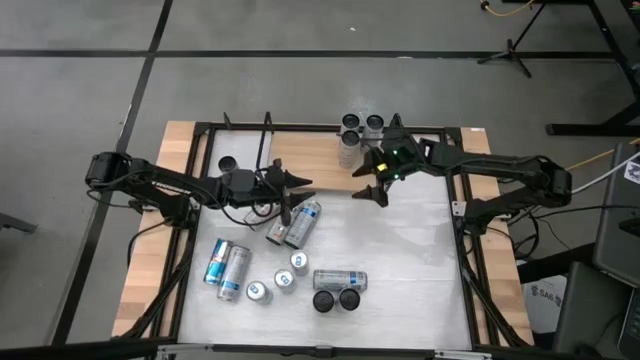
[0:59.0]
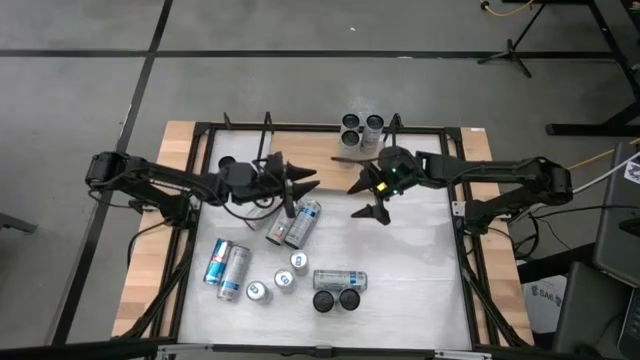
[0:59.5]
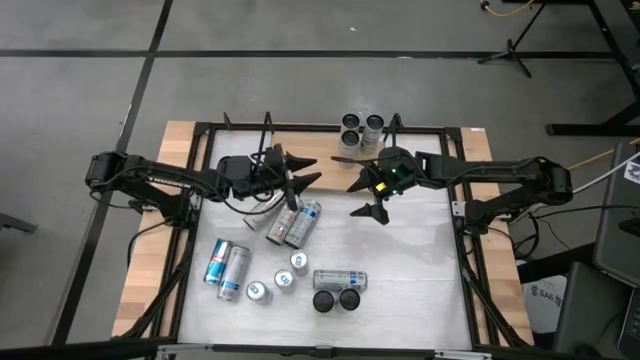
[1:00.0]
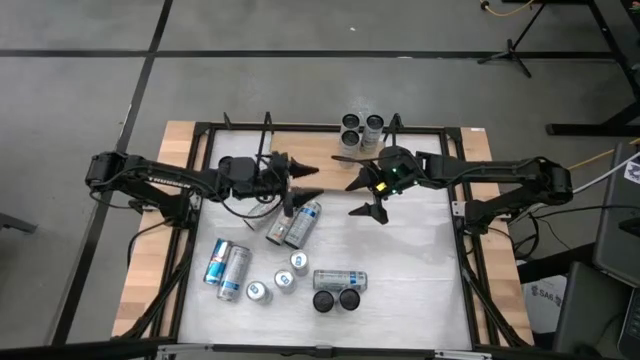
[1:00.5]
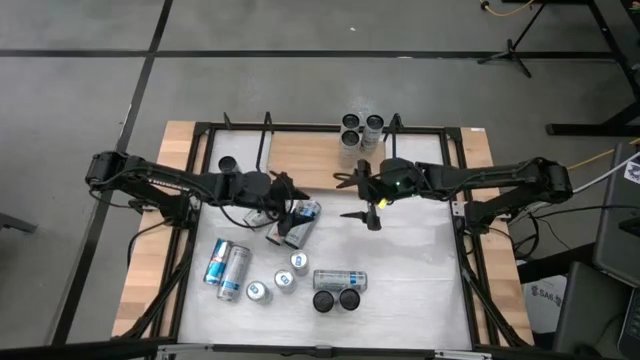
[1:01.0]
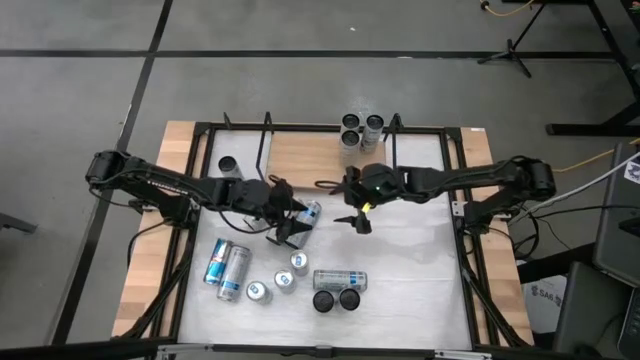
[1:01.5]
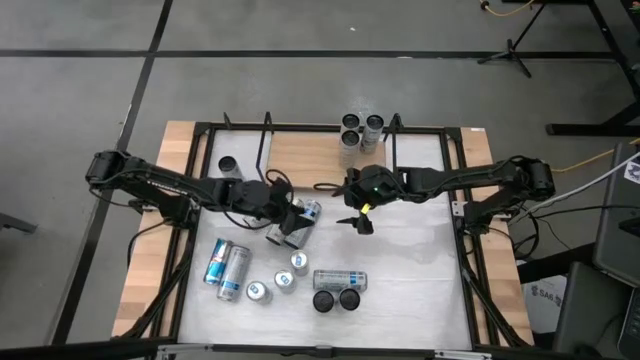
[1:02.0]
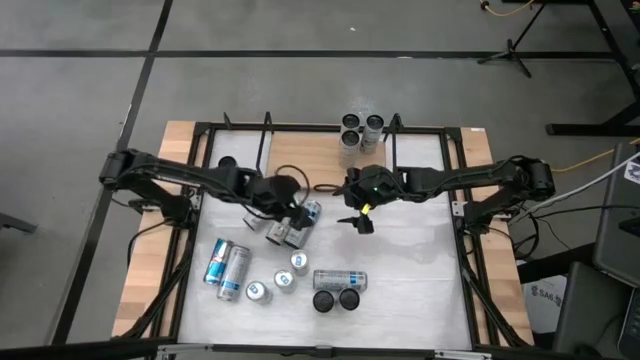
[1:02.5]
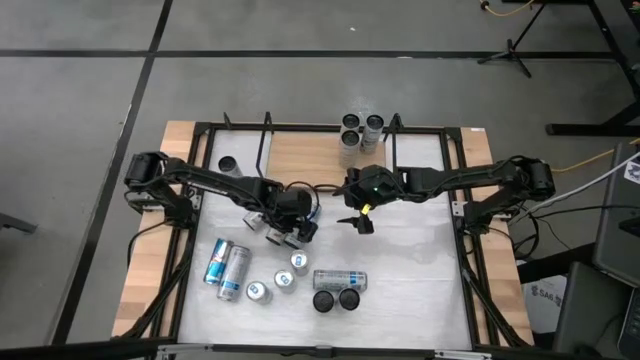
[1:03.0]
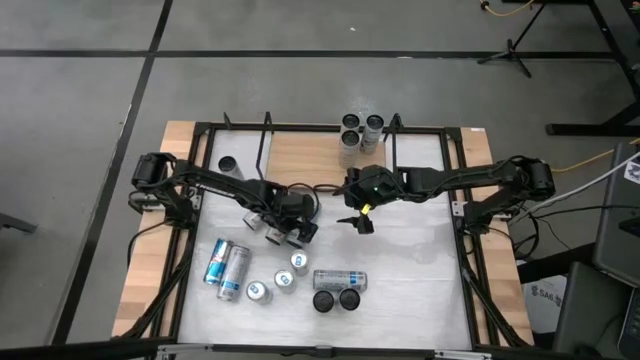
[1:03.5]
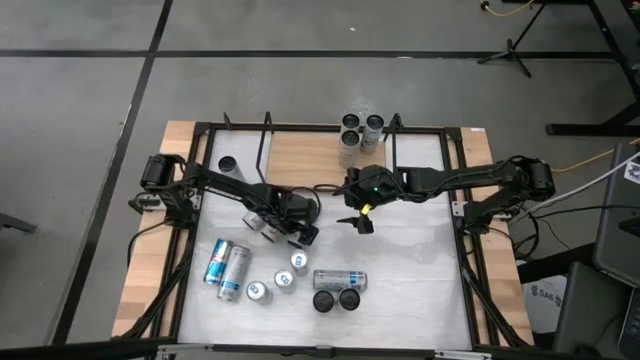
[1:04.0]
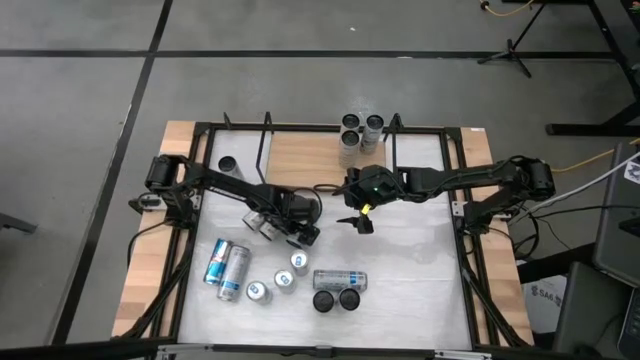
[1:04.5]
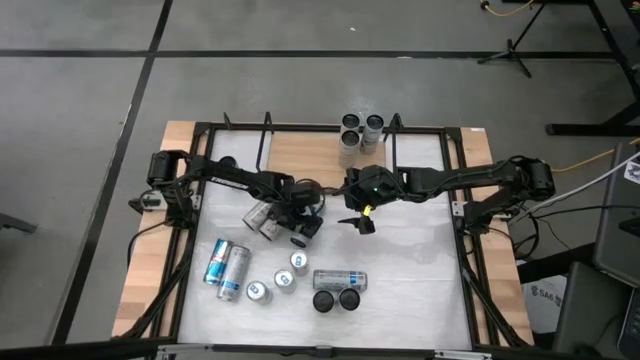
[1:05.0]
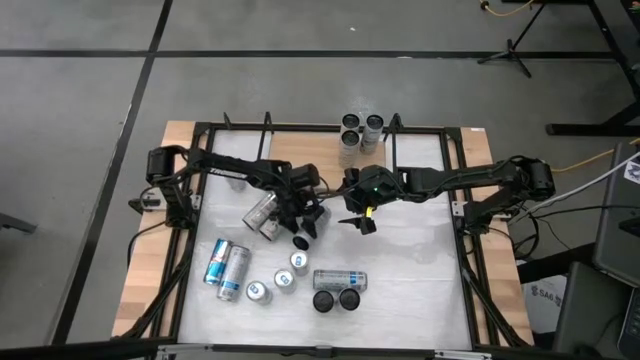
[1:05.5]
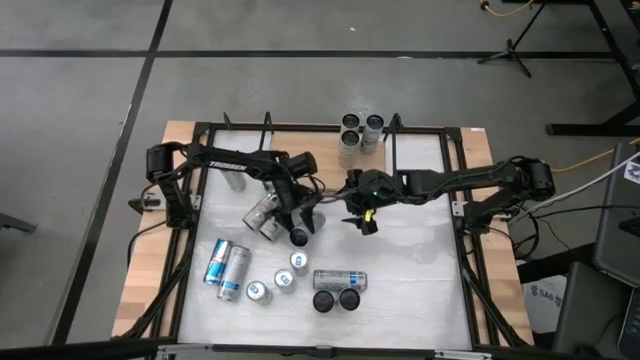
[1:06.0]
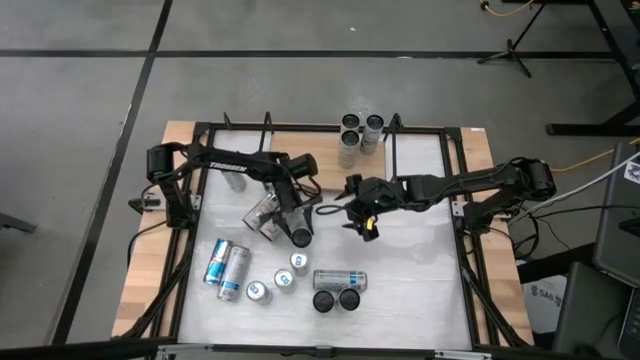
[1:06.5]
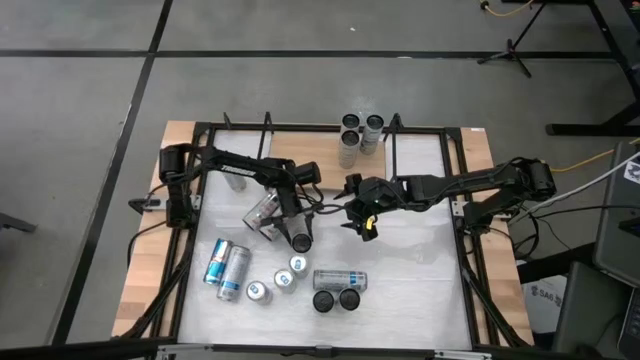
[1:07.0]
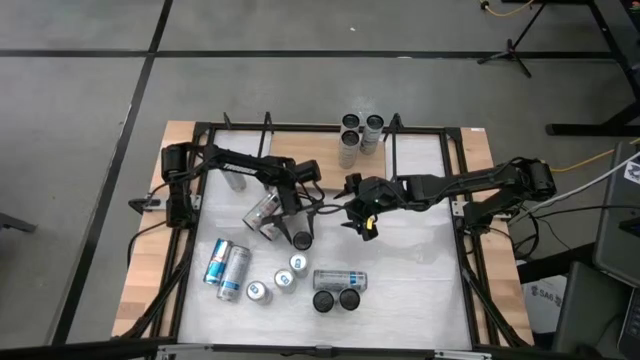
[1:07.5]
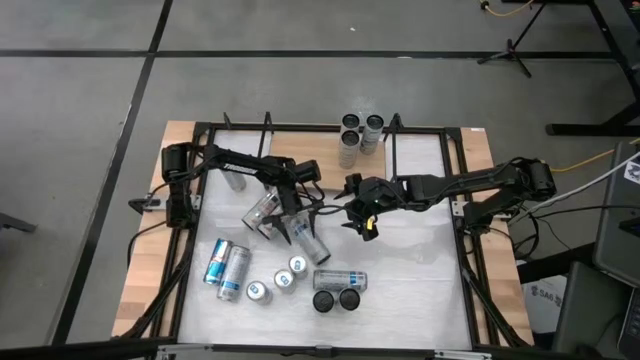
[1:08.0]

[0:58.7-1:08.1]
Task: Place canned beverage on shelf
Put the white soda can aligned with the other white soda can on the shelf

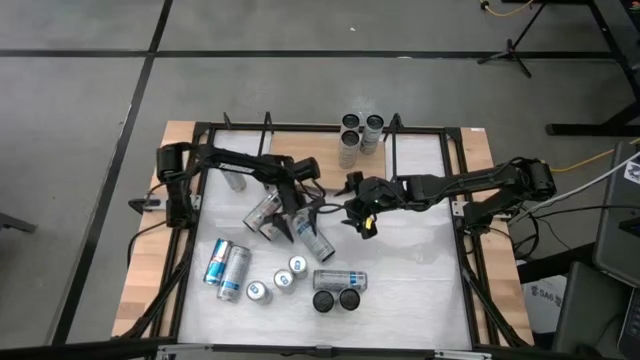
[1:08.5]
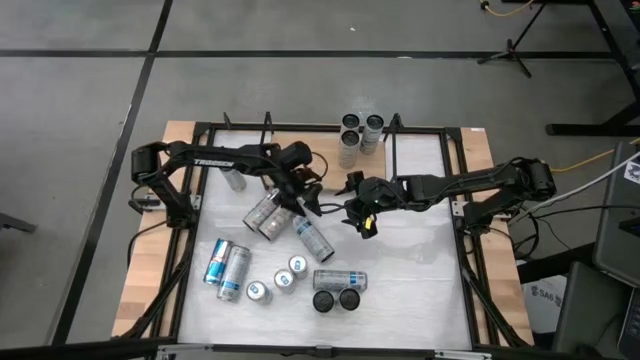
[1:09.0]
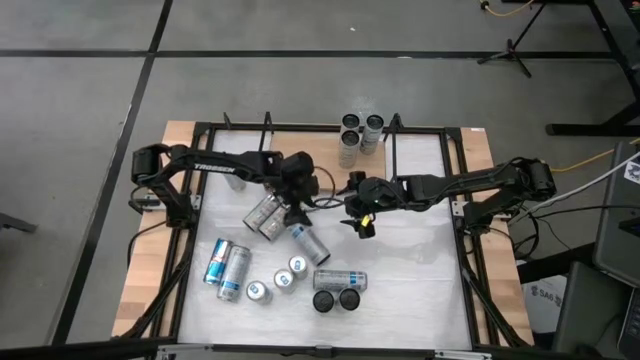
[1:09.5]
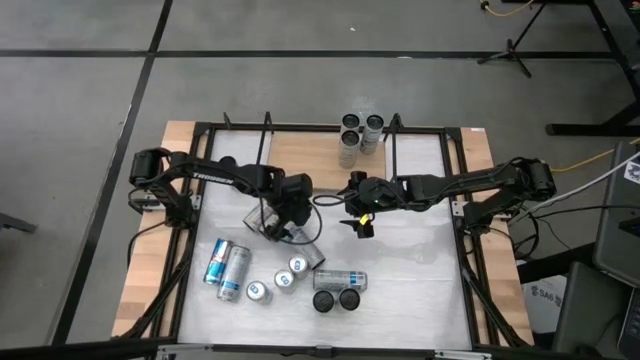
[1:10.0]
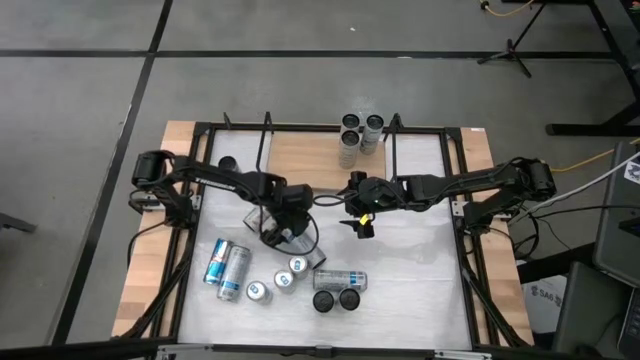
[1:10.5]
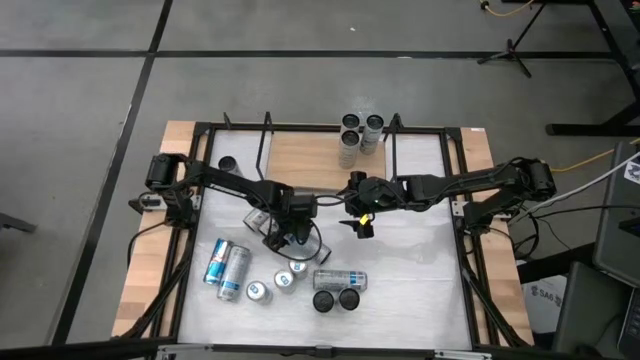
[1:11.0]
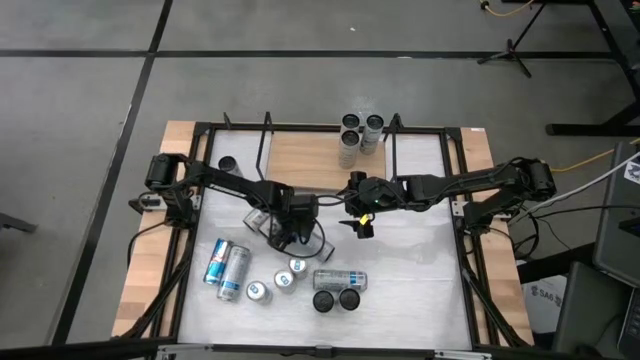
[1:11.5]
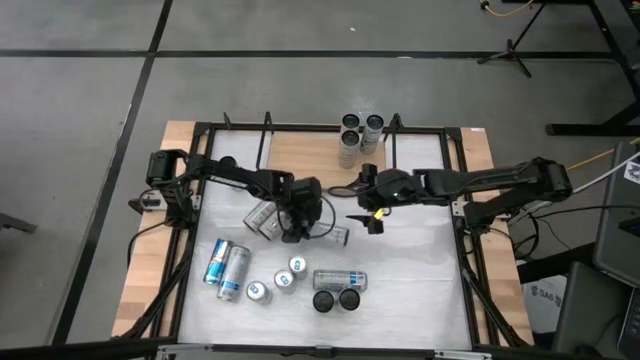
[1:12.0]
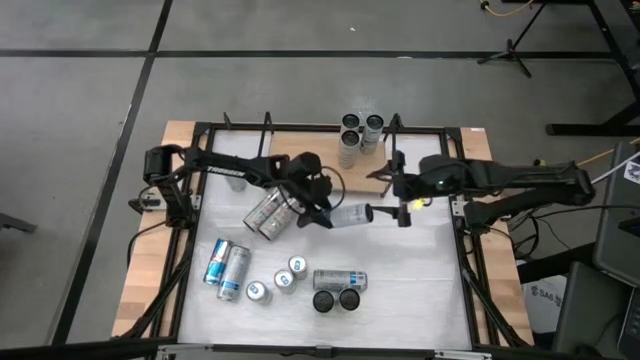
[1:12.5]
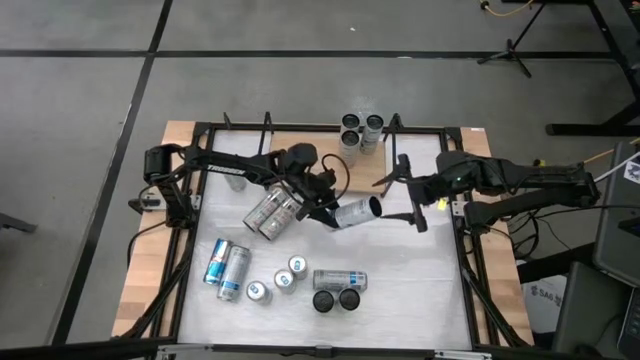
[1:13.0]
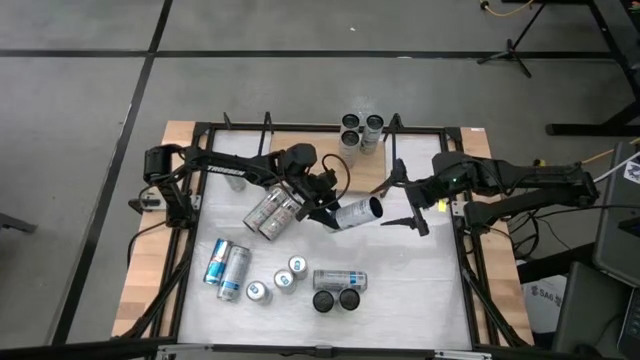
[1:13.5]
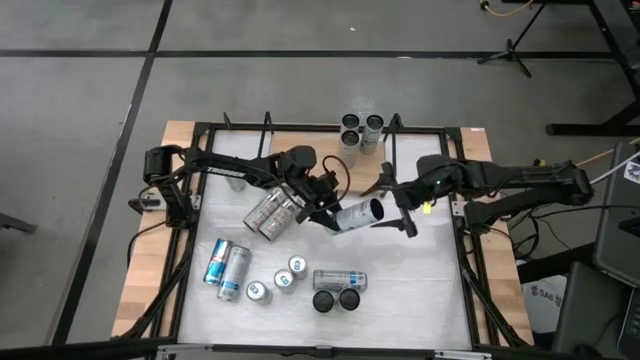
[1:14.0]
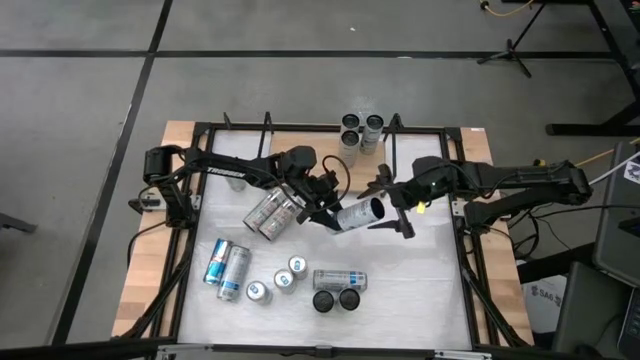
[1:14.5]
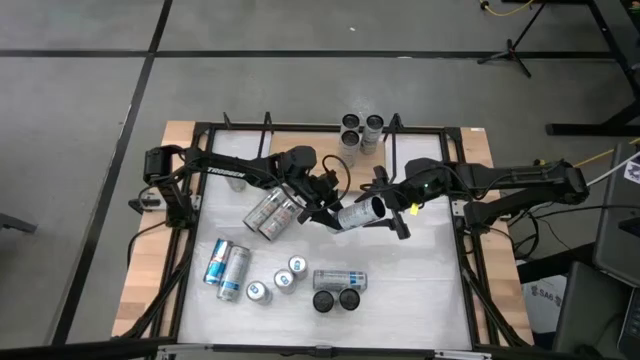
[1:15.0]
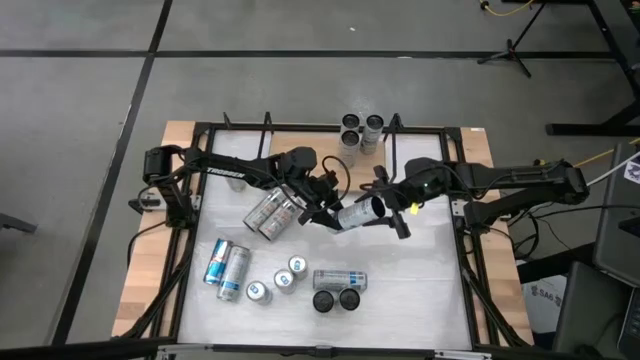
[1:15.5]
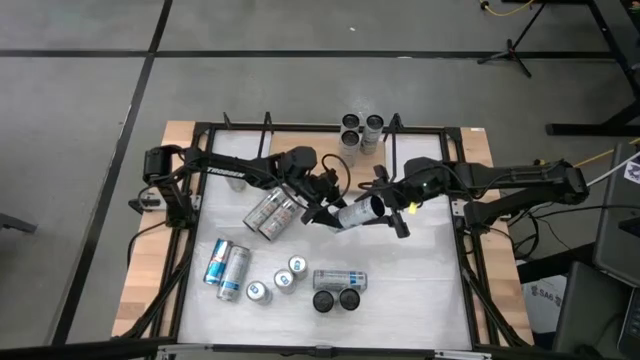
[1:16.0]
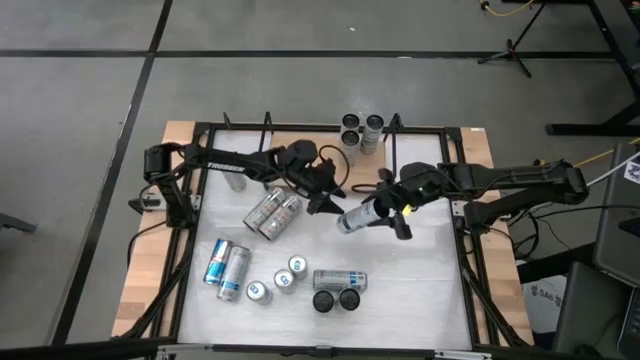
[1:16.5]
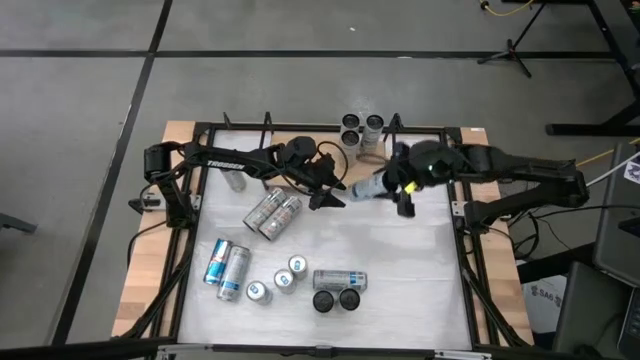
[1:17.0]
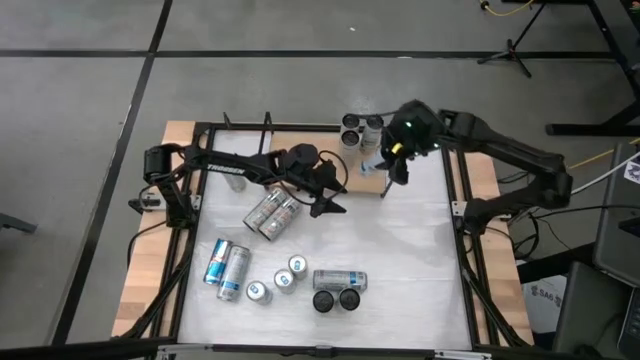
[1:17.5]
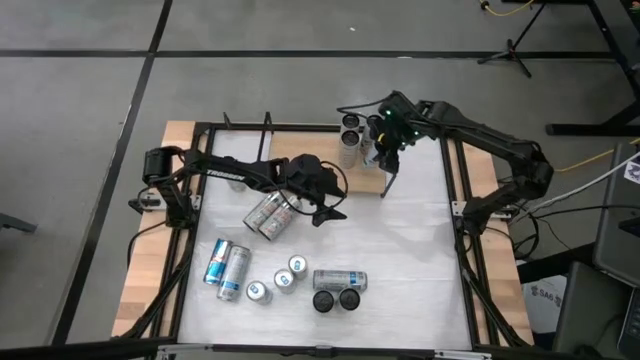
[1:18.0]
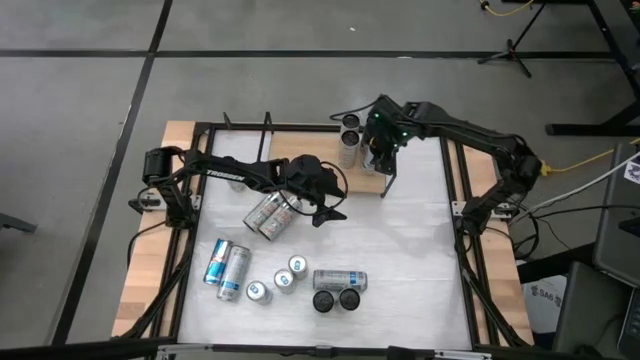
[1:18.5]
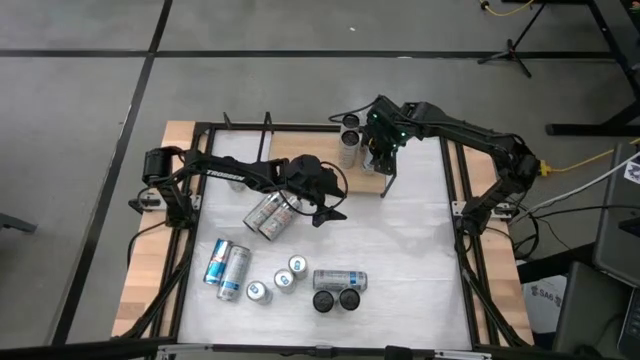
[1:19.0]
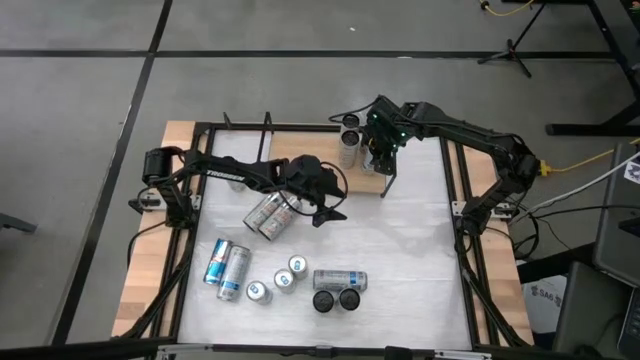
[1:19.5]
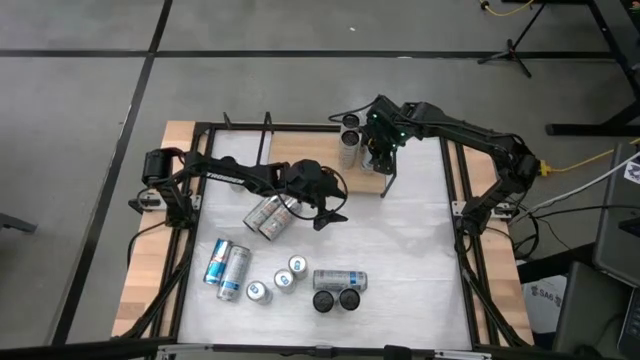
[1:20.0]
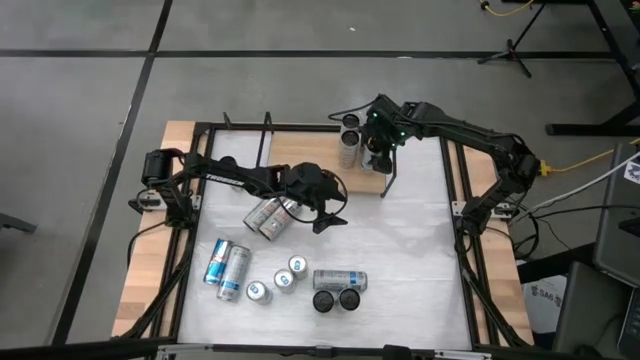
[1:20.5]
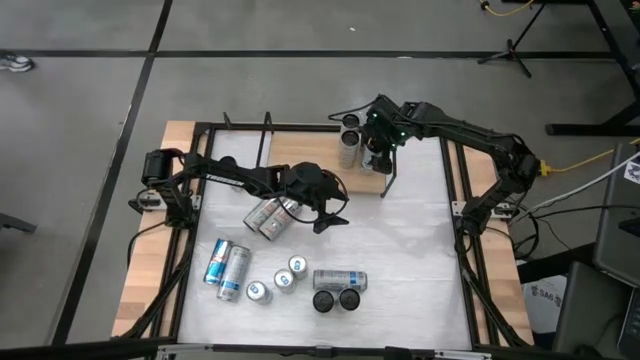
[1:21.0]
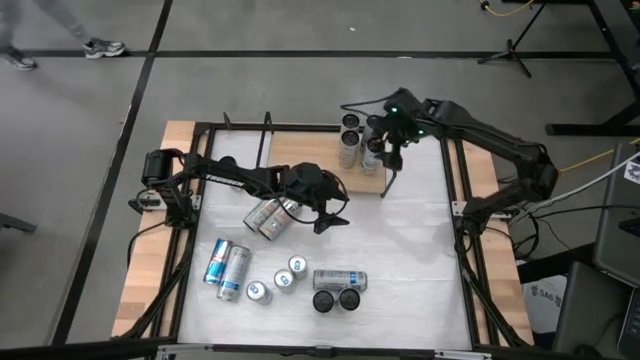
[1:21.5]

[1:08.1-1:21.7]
Put the white soda can aligned with the other white soda can on the shelf
